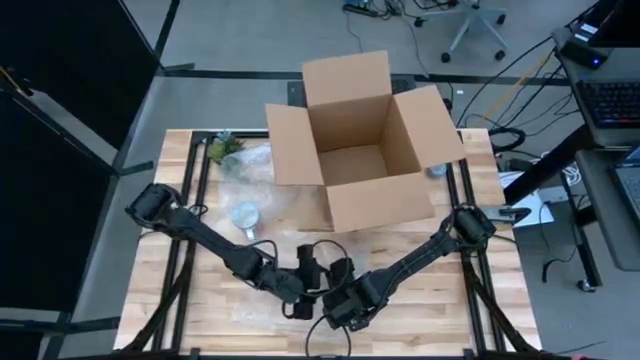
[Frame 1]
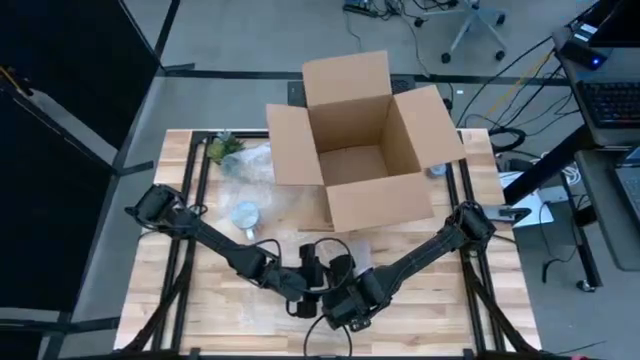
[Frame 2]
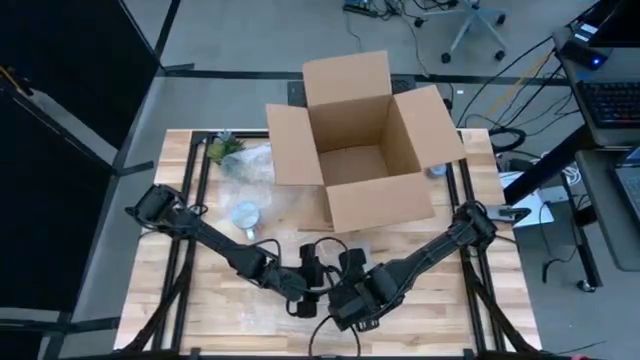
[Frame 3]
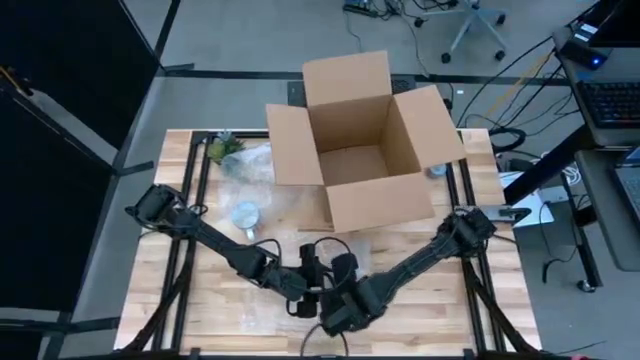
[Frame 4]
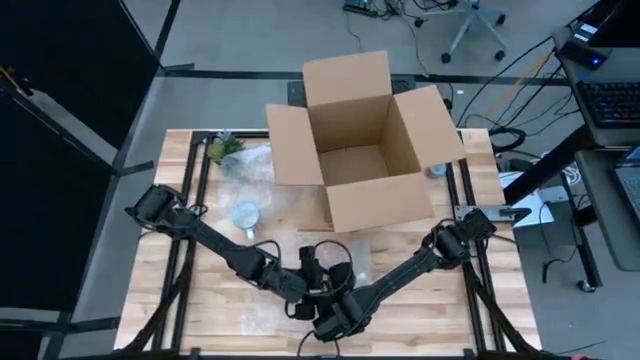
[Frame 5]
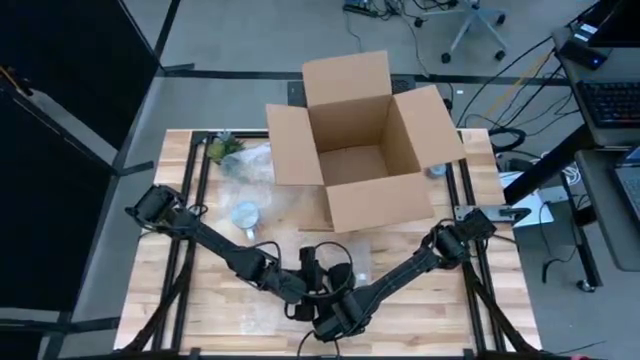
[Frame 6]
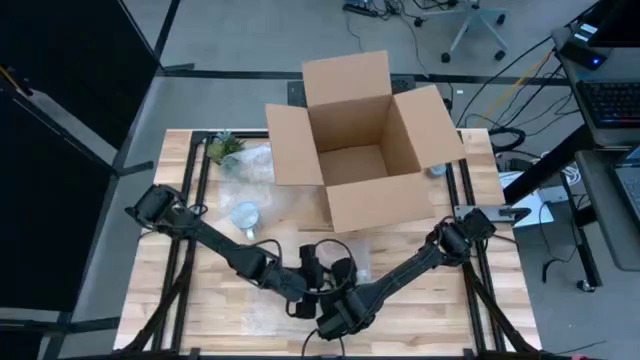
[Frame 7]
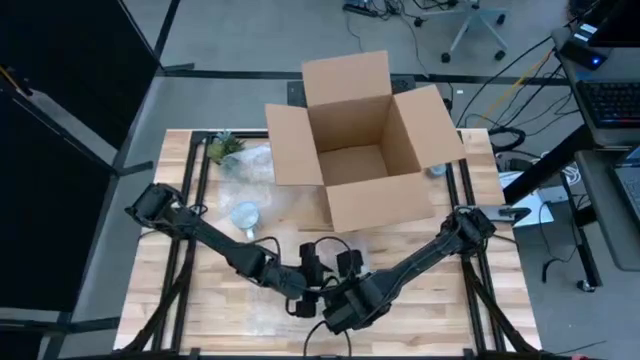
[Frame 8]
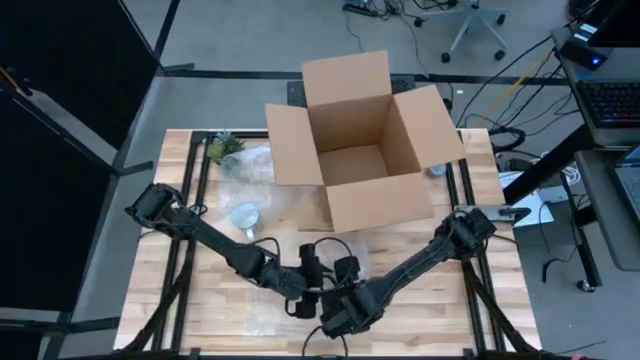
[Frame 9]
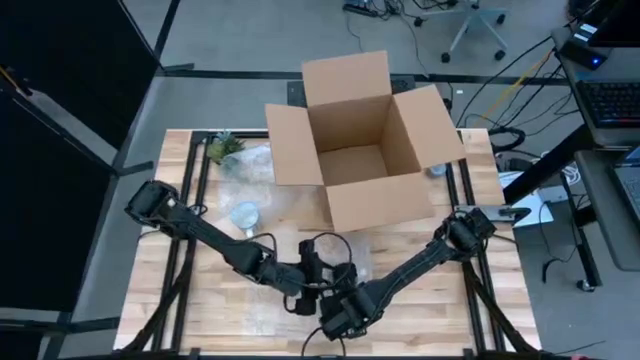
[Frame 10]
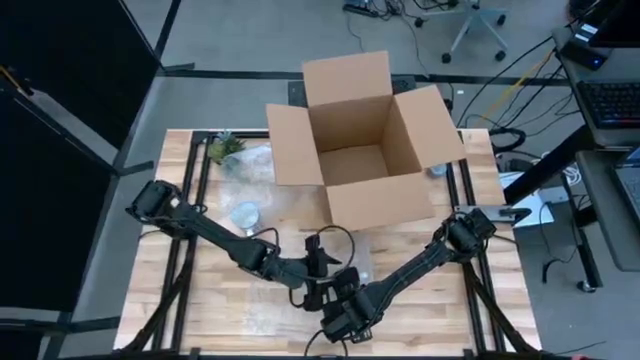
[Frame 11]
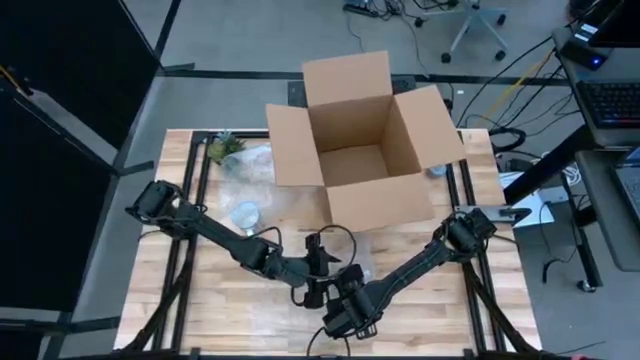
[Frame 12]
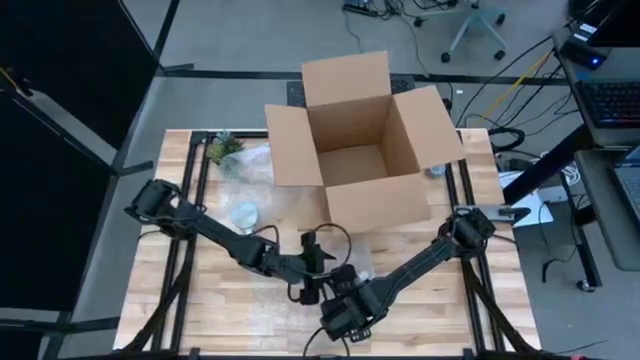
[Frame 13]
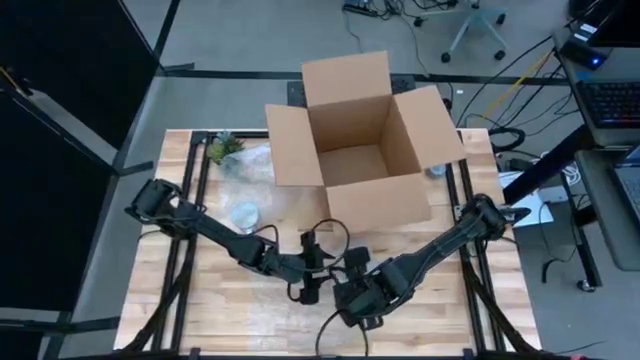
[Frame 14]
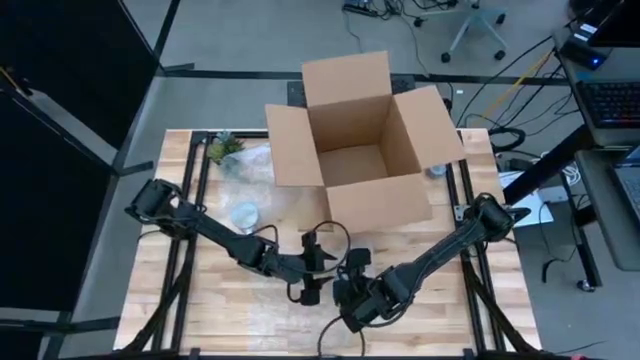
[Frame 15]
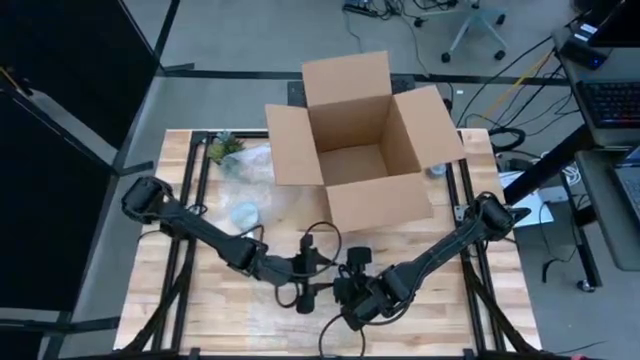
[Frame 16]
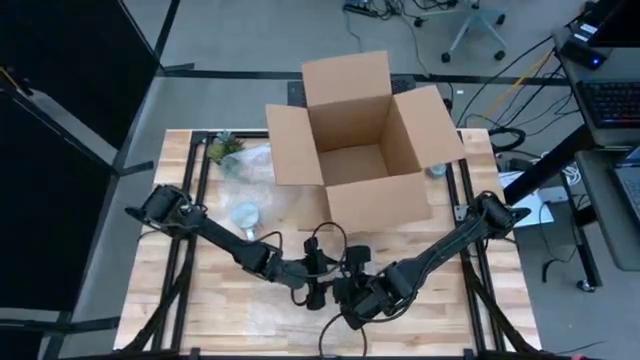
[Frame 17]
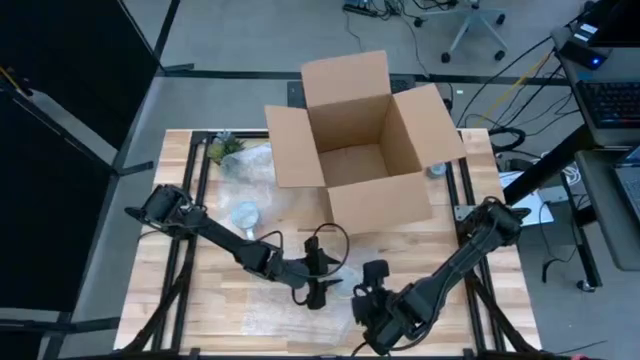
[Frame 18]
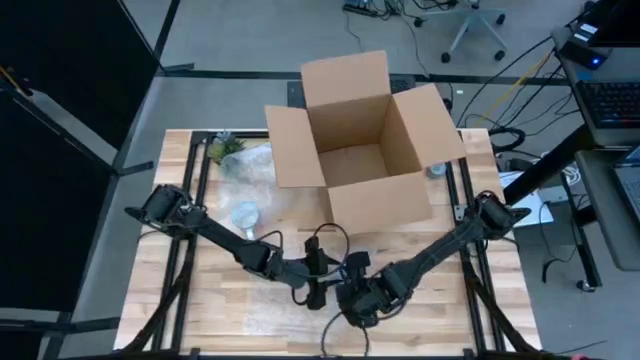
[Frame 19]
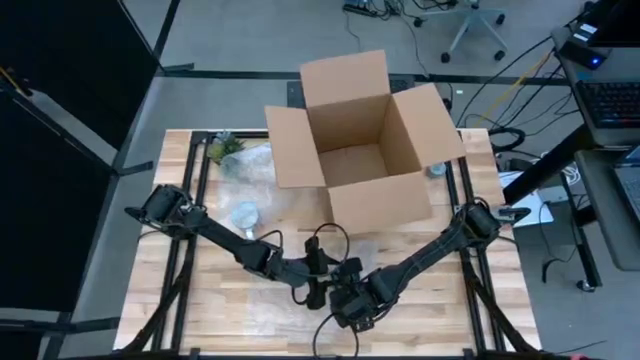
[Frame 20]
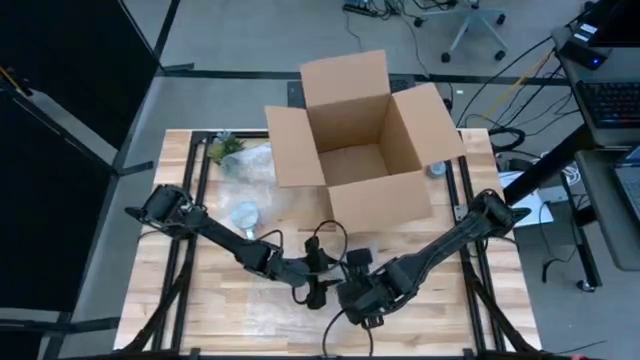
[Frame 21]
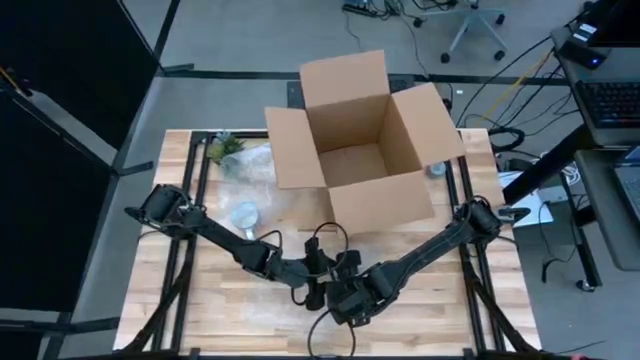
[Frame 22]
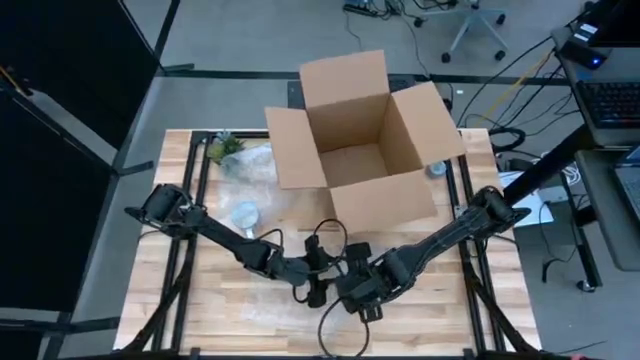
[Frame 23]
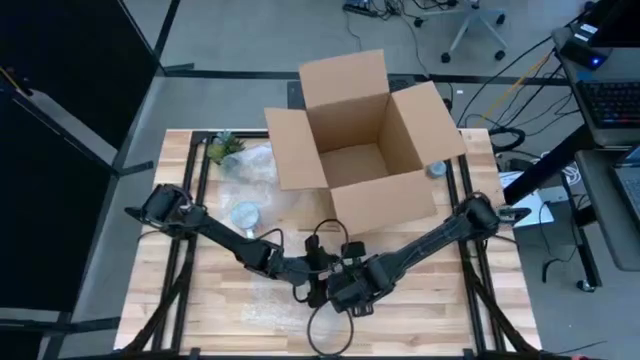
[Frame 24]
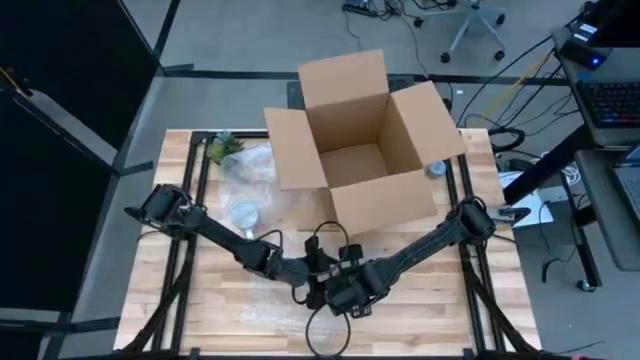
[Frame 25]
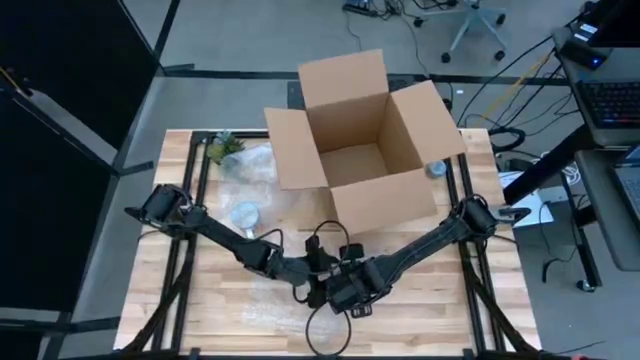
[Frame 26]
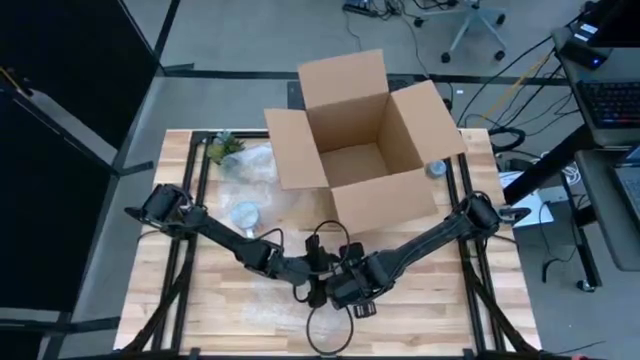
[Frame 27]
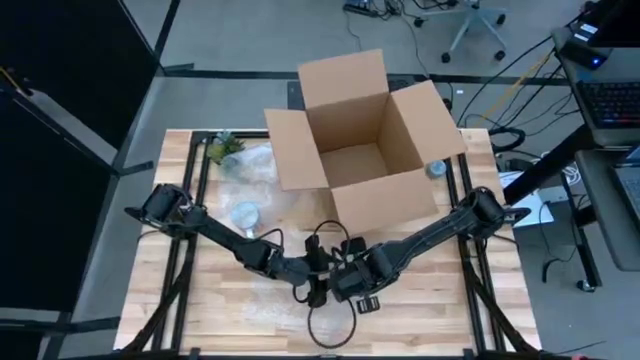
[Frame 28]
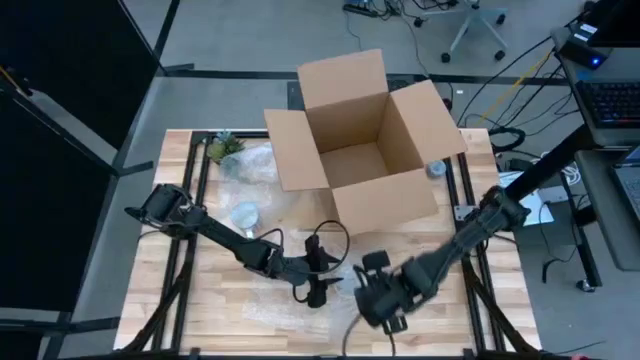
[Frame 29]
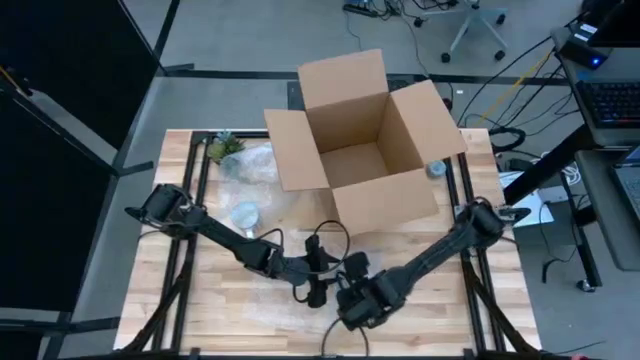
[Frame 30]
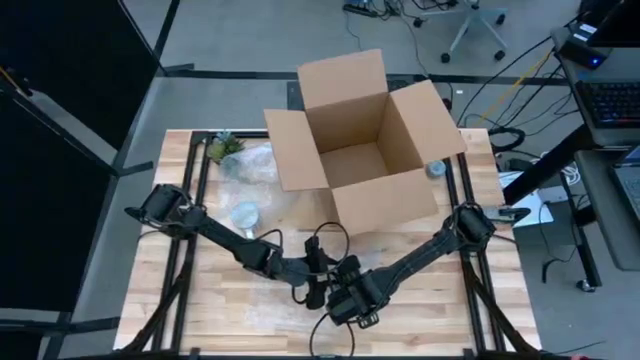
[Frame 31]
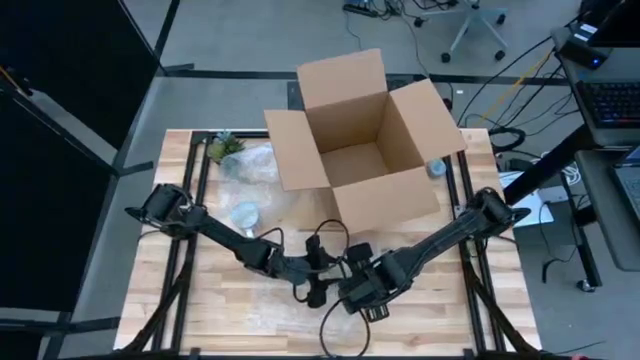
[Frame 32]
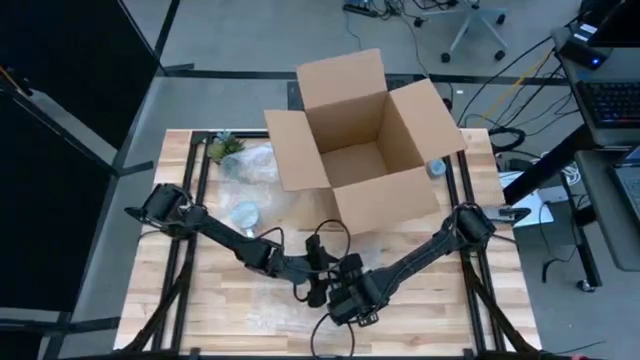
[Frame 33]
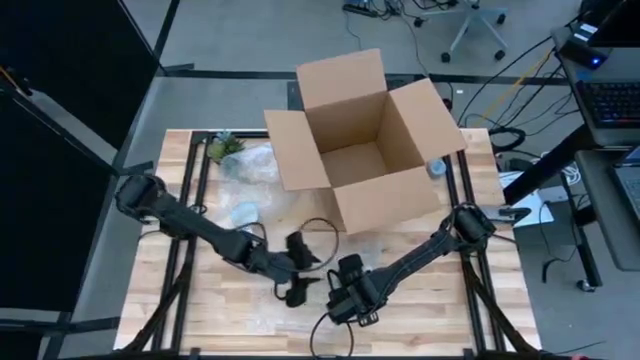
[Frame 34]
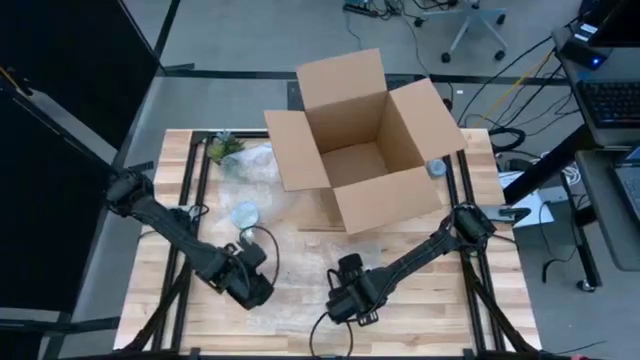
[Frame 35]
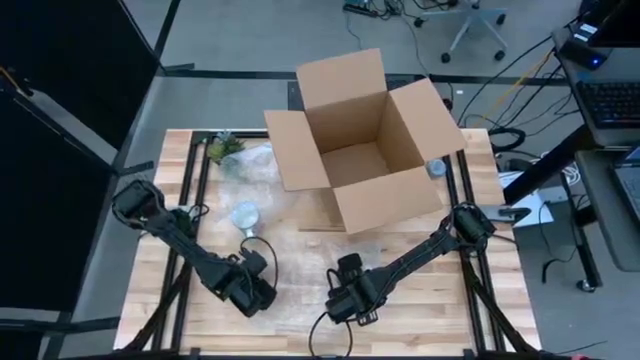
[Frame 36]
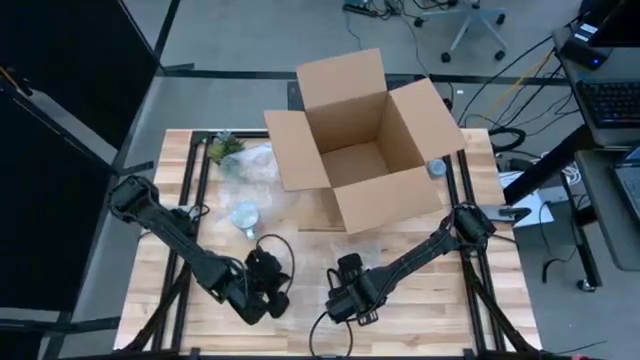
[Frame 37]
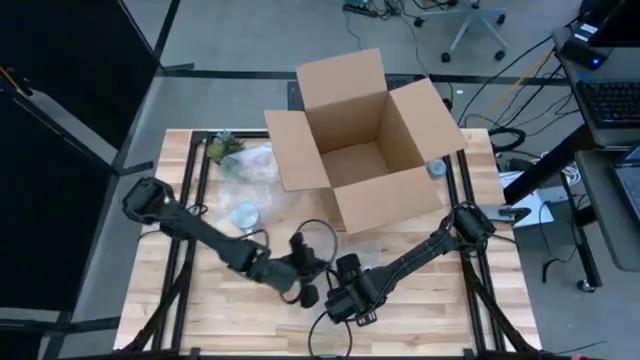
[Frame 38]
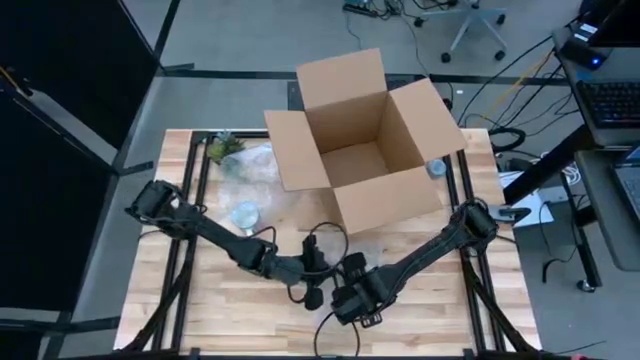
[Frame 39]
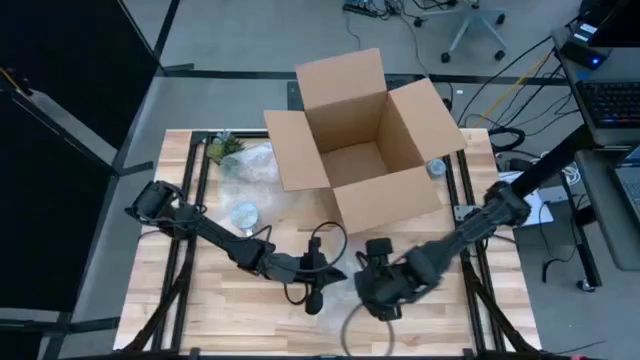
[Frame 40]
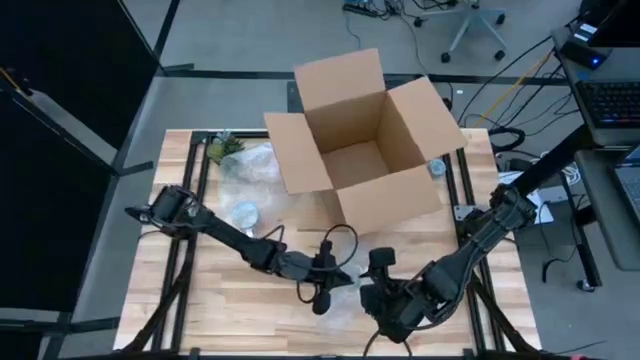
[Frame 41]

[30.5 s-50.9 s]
Task: wrap mug
Wrap the yellow mug with the bubble wrap

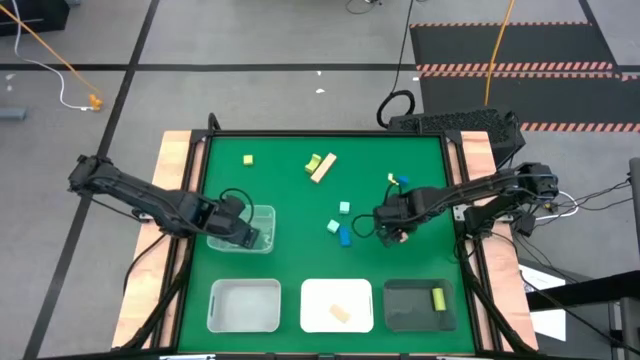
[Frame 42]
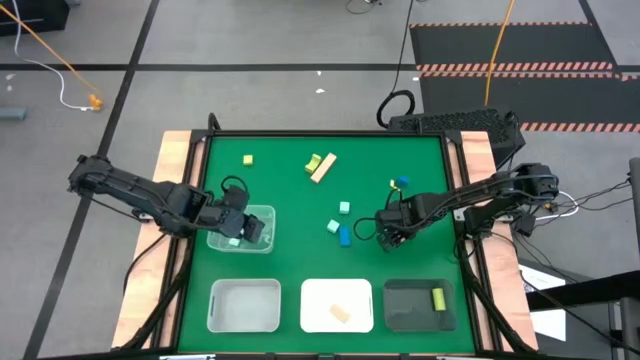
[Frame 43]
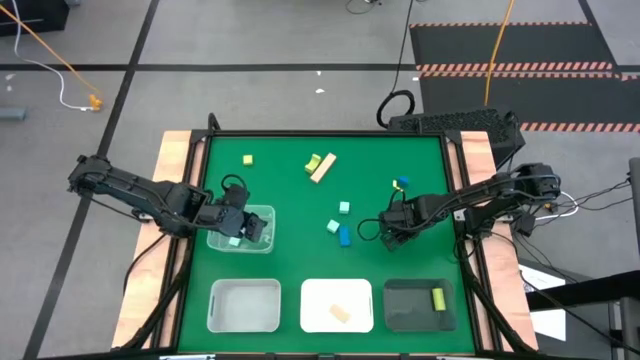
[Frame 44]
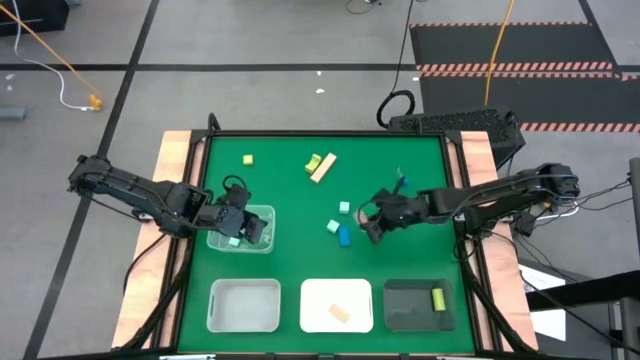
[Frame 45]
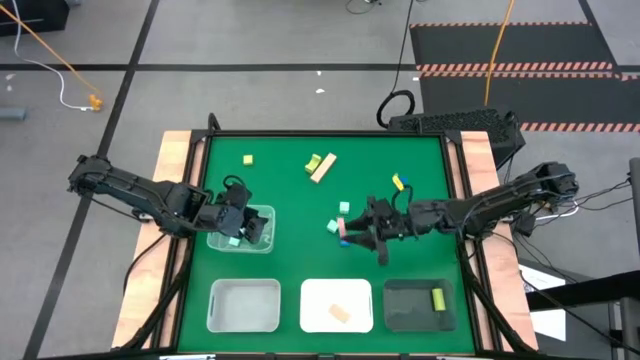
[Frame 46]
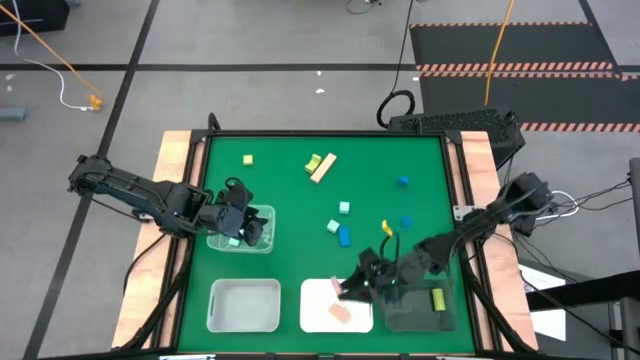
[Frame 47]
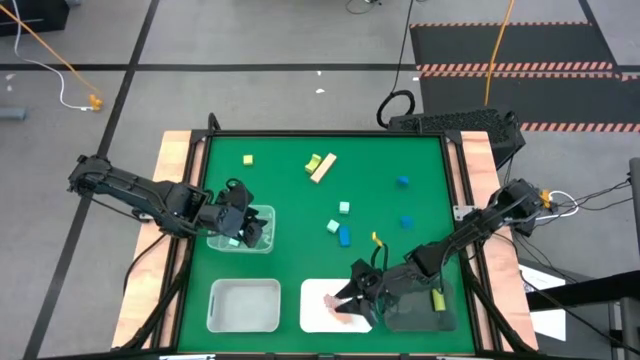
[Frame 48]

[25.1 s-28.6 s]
Task: Sort & place blocks by color
Put the bottom pink block into the white bin
